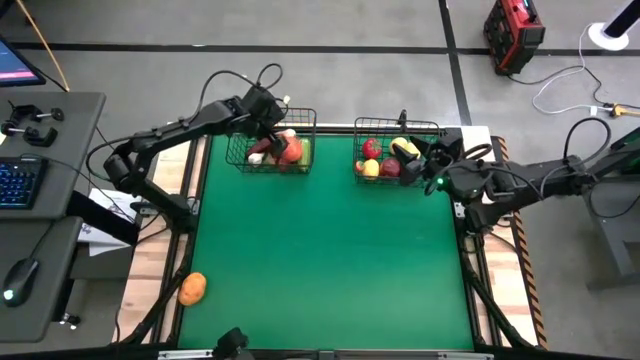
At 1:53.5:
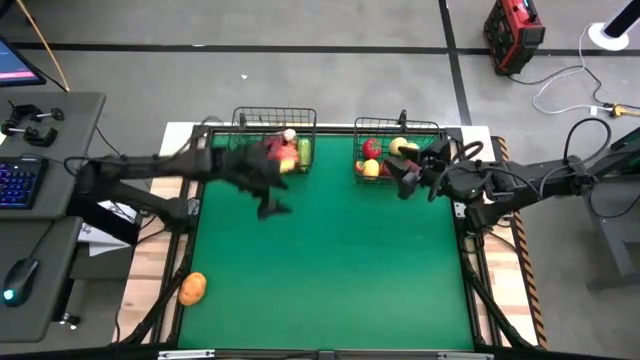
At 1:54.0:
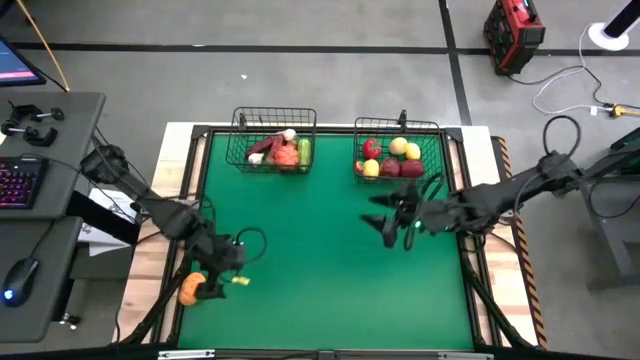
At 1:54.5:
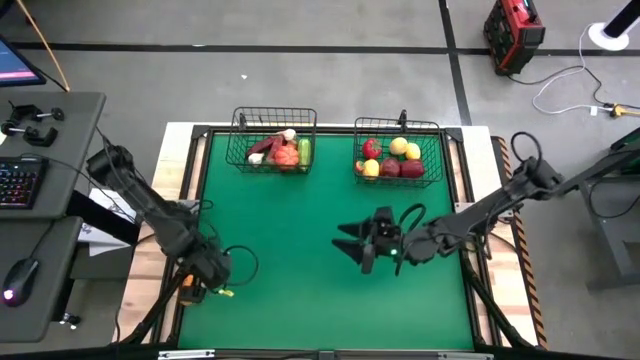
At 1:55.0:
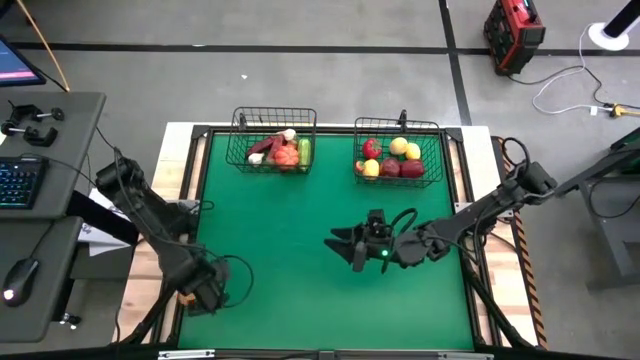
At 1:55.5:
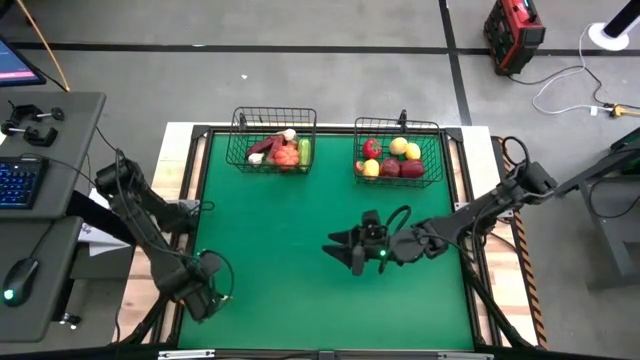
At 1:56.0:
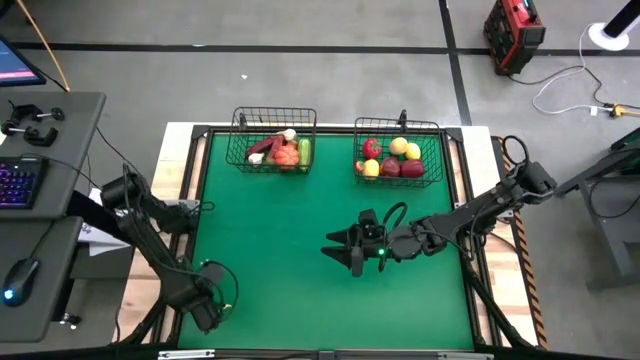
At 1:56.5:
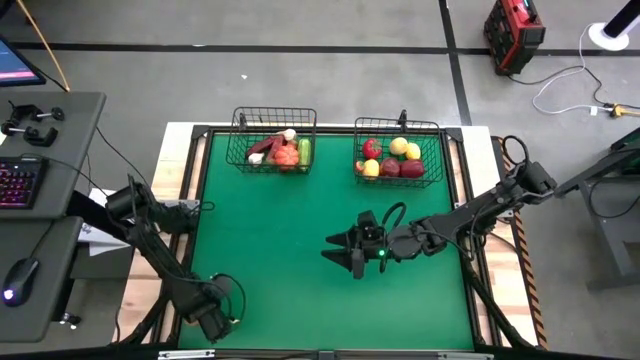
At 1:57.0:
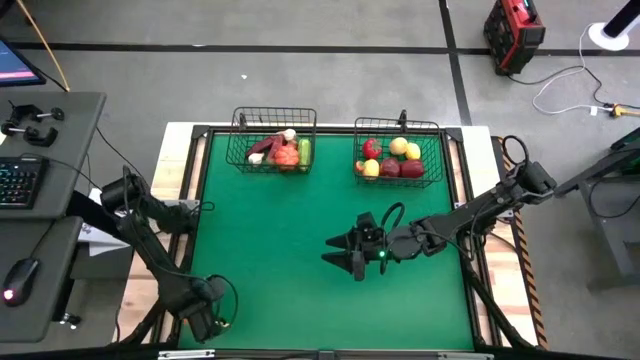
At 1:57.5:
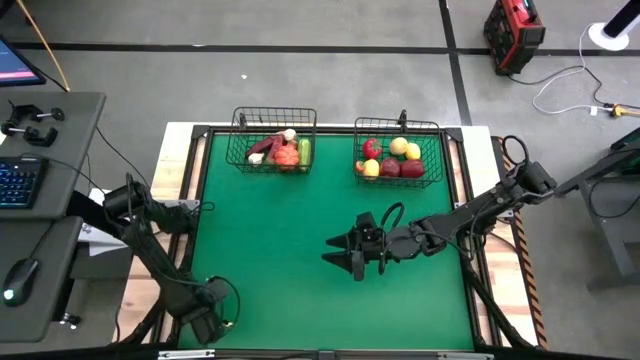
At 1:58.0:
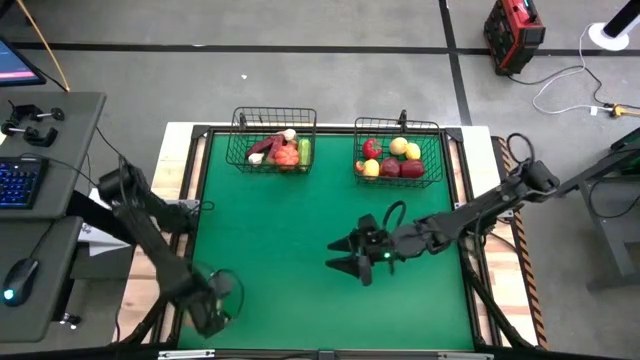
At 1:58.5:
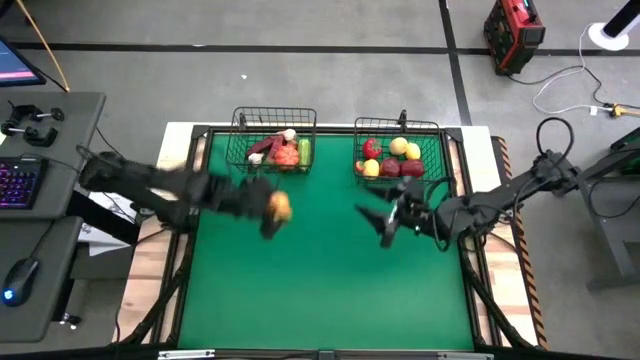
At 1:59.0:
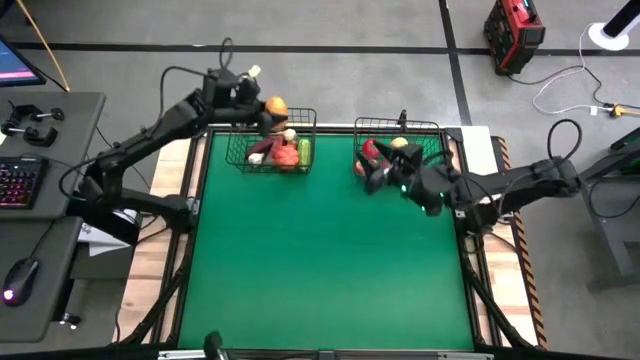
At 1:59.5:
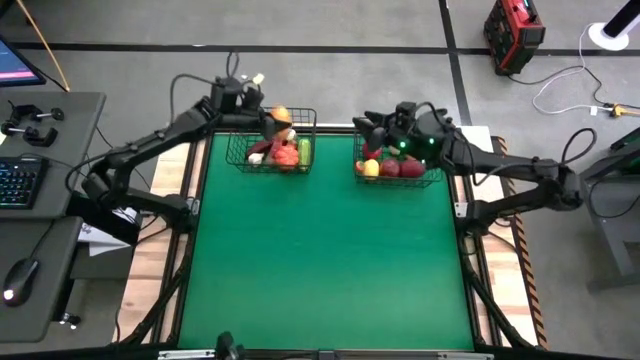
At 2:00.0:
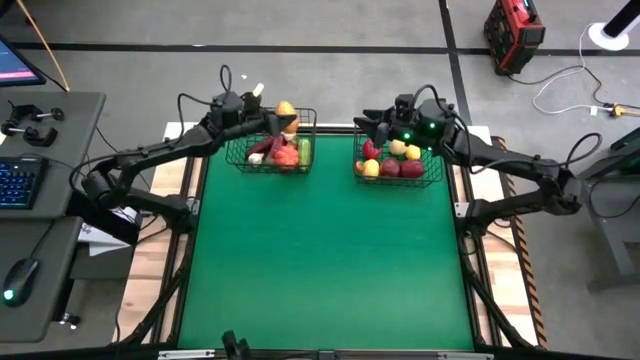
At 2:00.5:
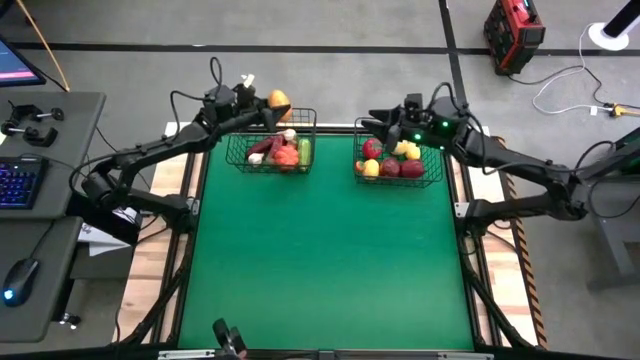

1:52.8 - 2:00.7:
Task: Sort produce into baskets
Put the brown potato into the left wire basket

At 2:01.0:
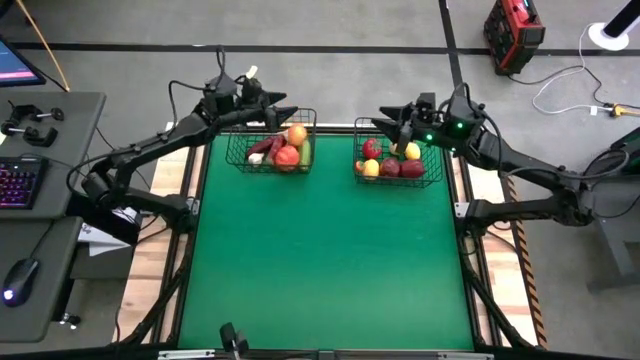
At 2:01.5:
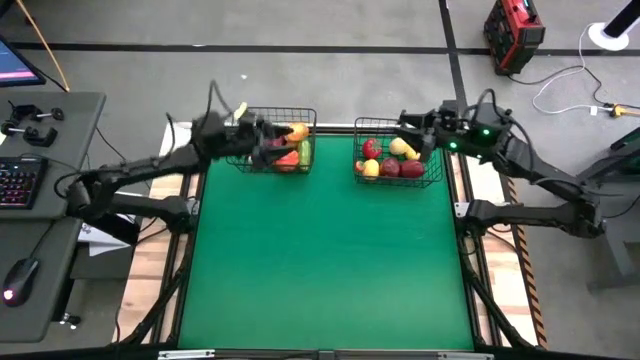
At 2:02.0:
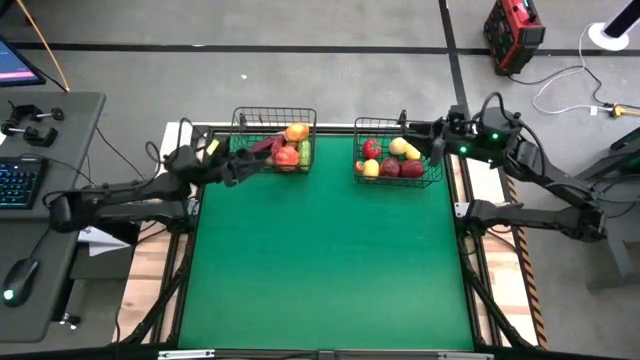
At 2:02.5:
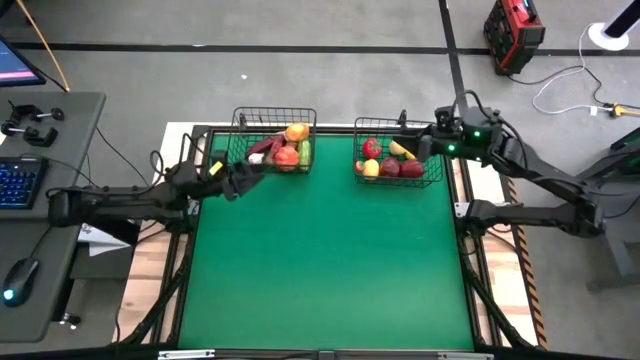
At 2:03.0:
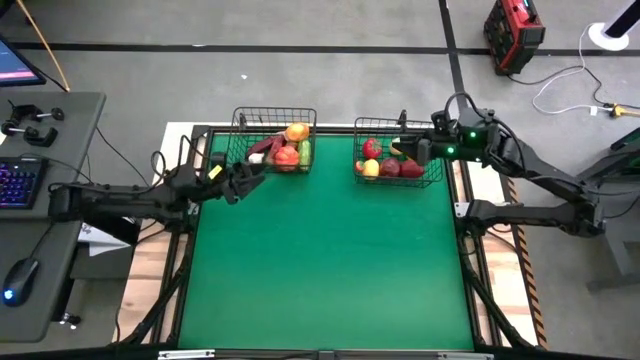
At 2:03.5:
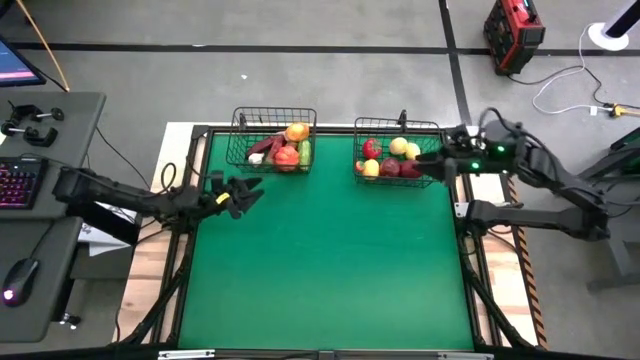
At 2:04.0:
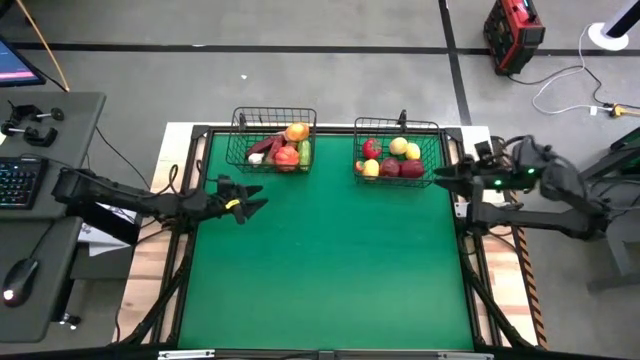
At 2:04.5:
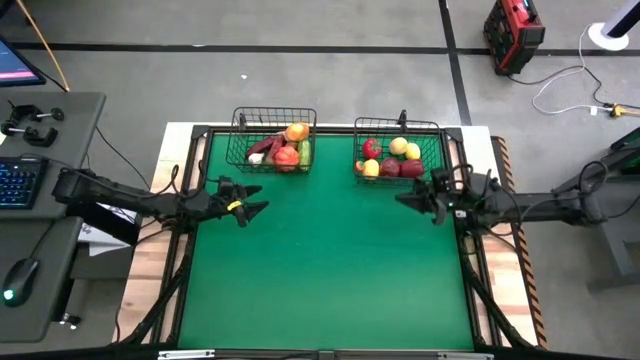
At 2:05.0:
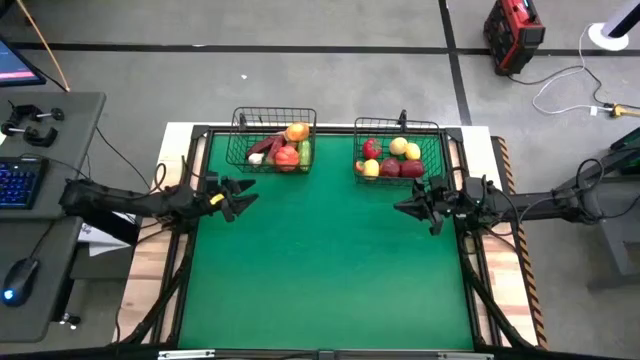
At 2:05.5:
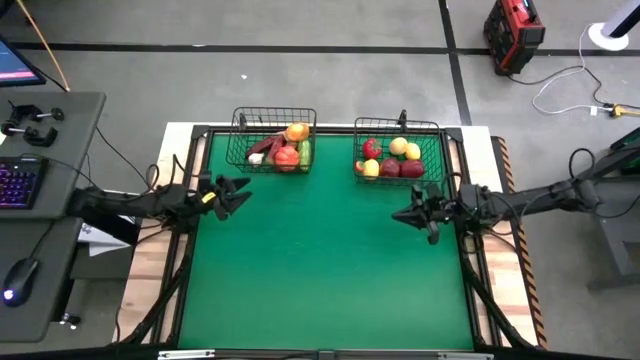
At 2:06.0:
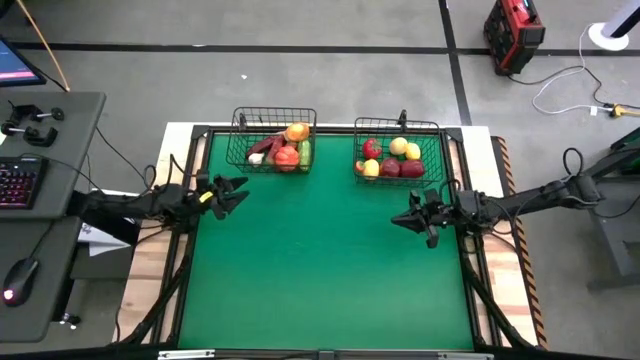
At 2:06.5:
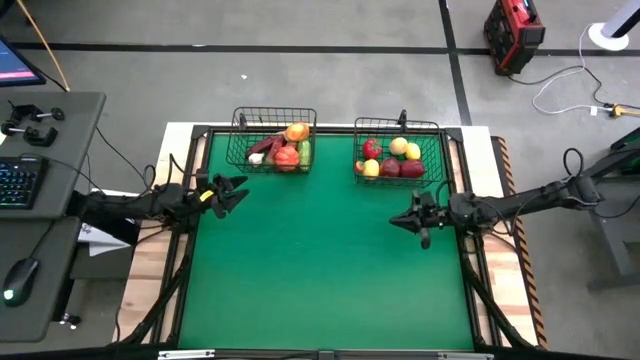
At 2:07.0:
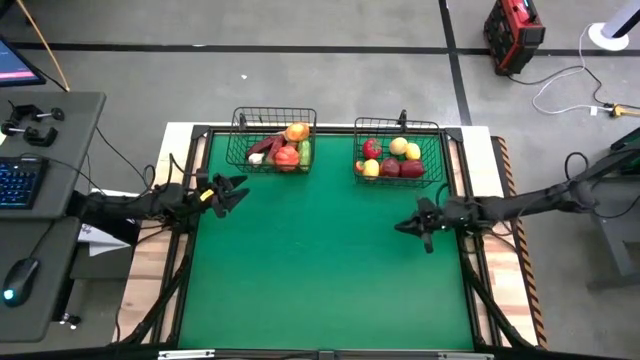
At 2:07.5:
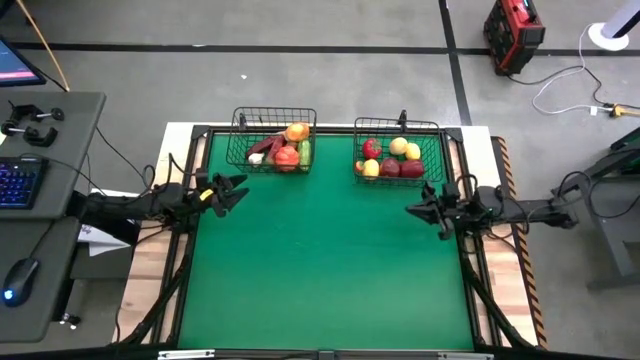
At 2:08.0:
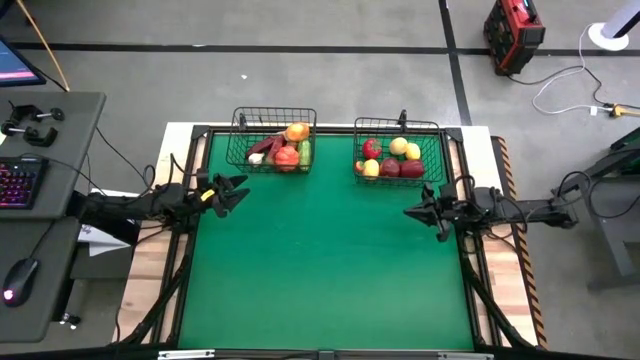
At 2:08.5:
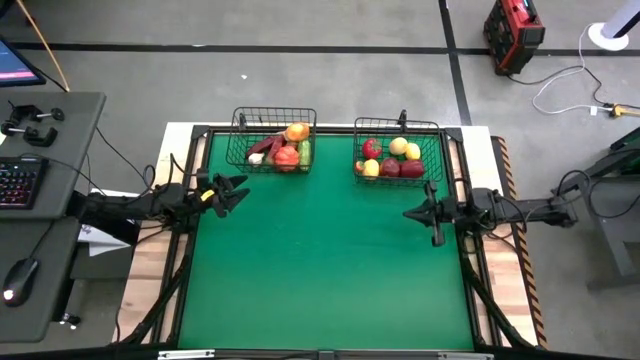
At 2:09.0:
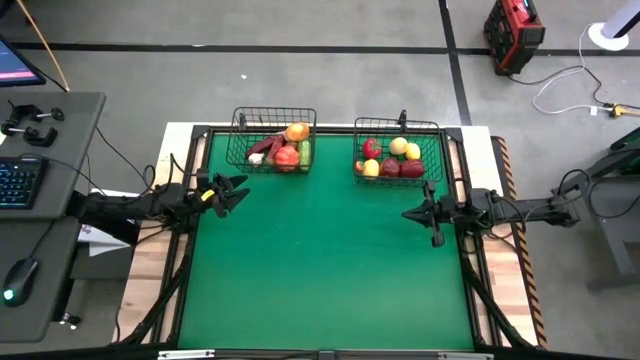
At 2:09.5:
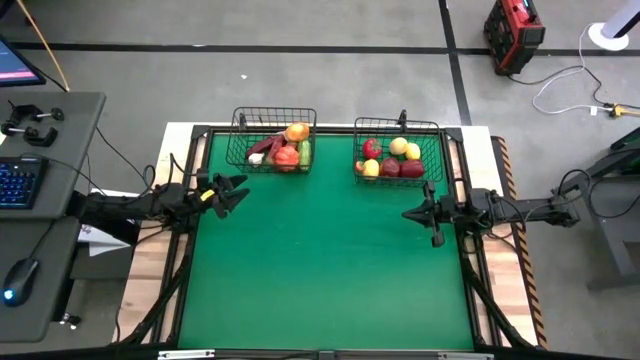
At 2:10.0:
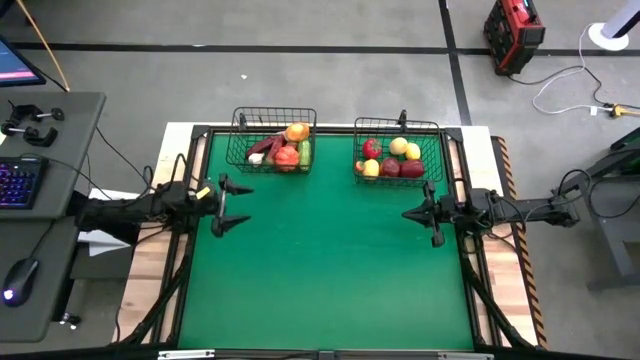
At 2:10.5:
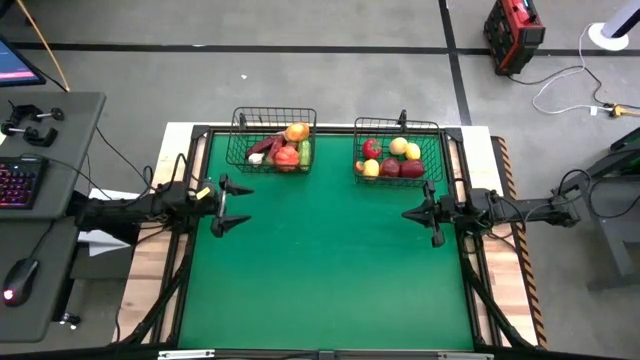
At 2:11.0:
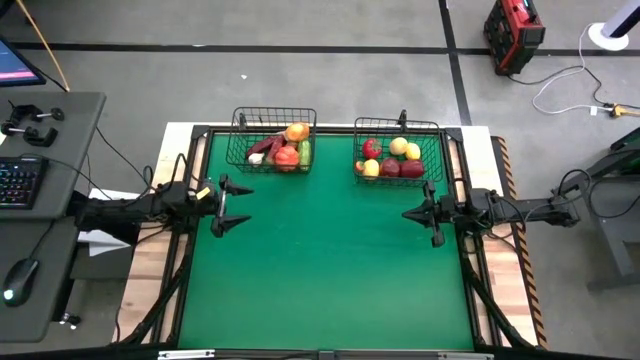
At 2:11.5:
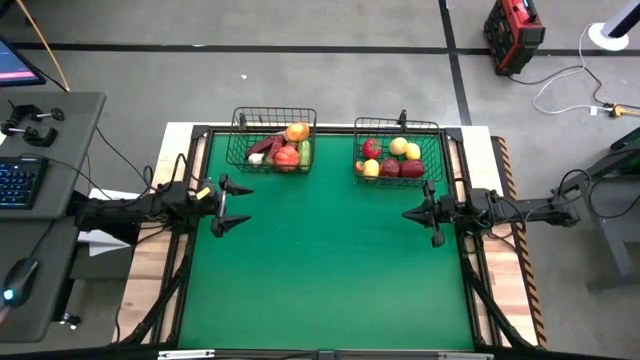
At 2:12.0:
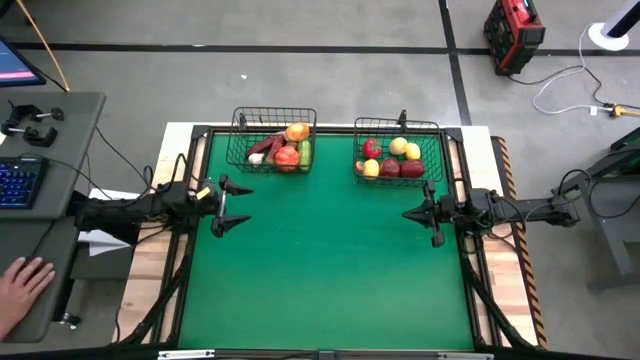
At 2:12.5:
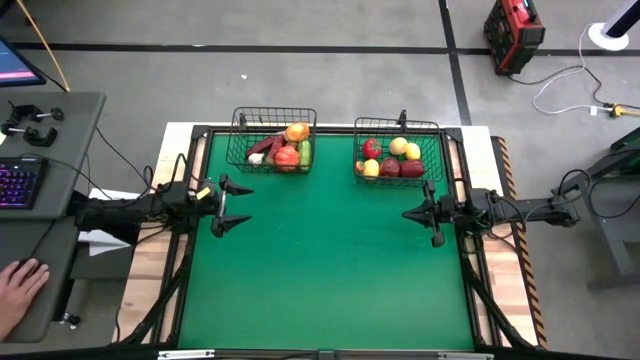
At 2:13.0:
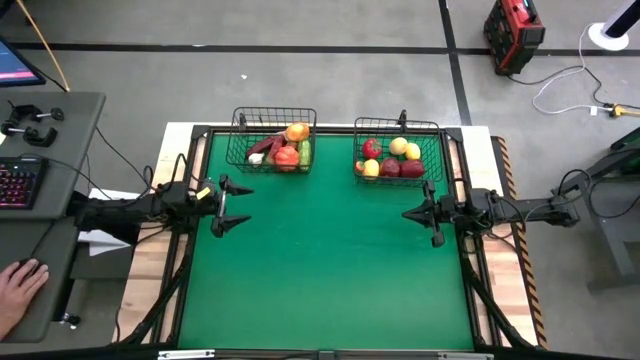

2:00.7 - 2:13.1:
Return to Home Position

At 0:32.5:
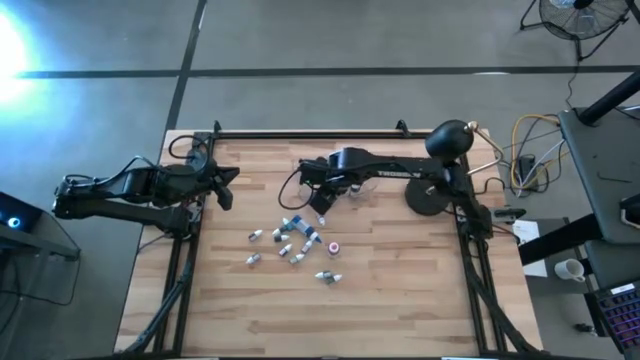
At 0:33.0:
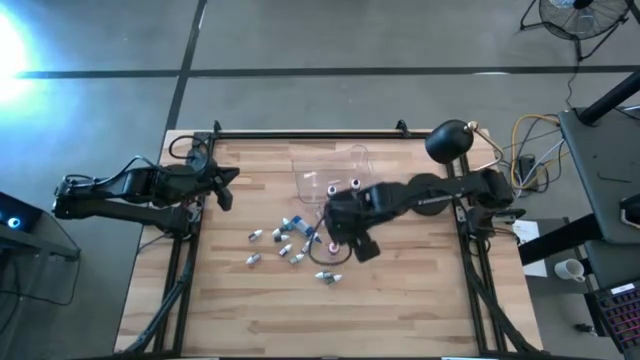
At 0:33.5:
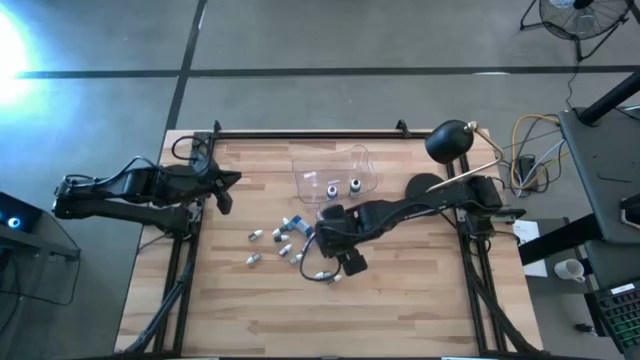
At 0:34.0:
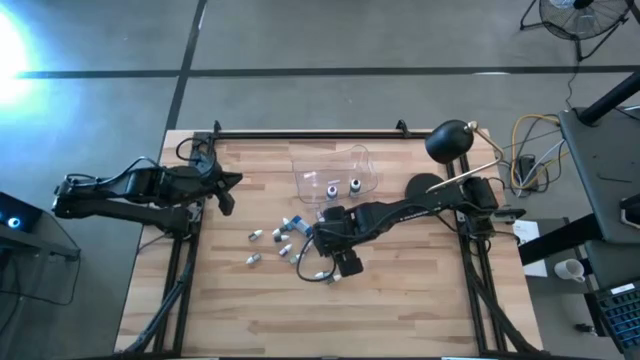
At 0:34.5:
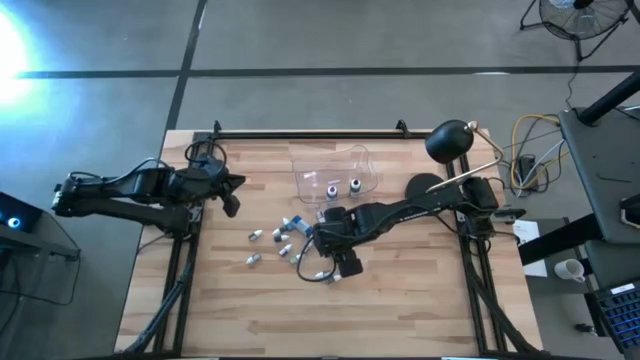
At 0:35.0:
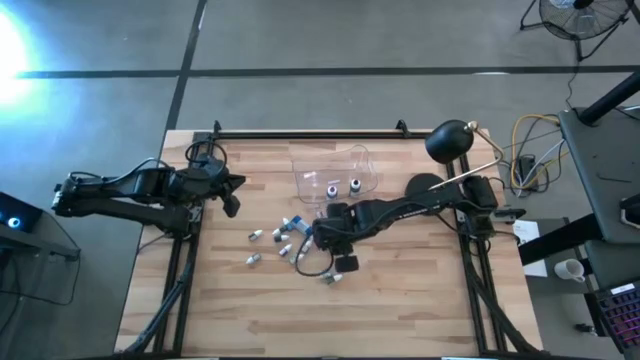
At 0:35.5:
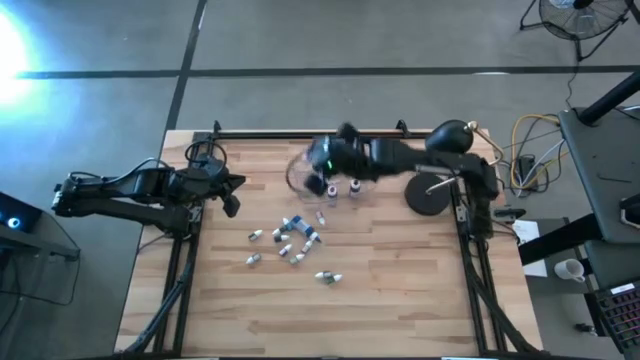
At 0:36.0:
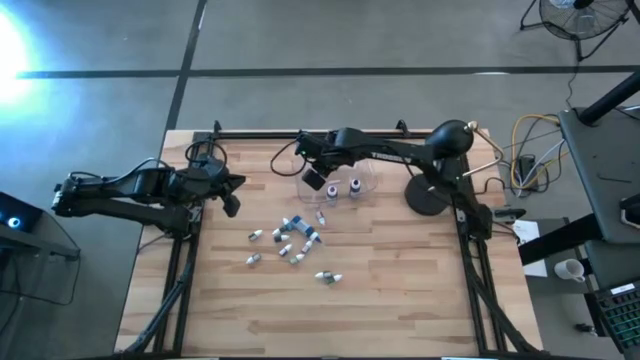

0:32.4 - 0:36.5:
Task: Pick & Place food coloring
Put the large pink food coloring bottle into the transparent bin
